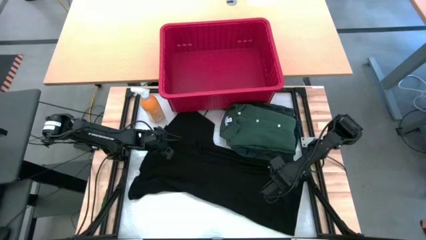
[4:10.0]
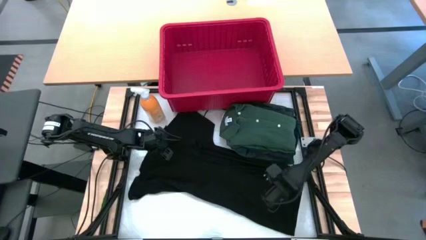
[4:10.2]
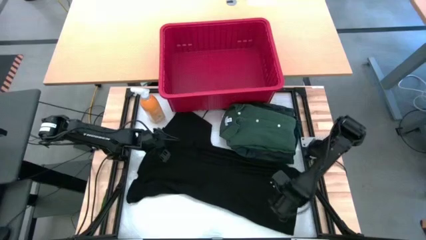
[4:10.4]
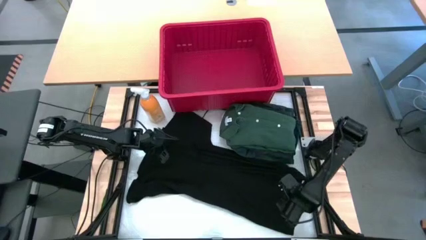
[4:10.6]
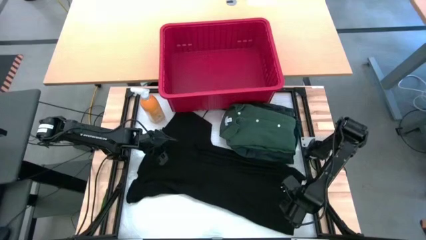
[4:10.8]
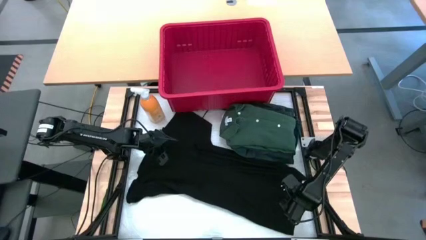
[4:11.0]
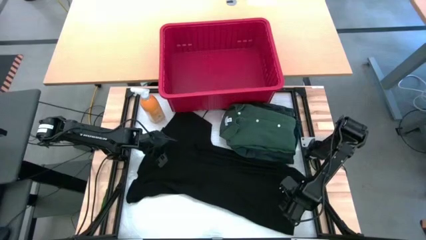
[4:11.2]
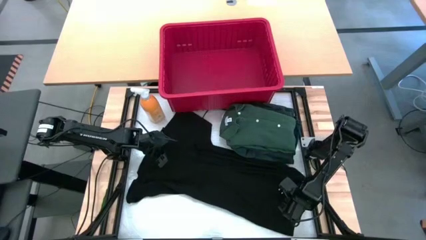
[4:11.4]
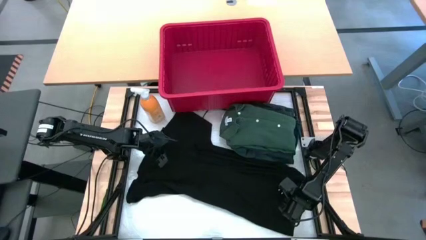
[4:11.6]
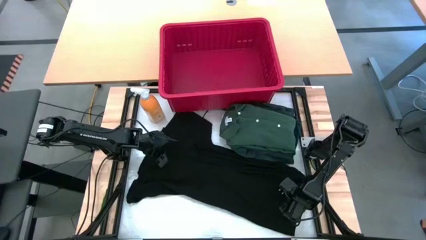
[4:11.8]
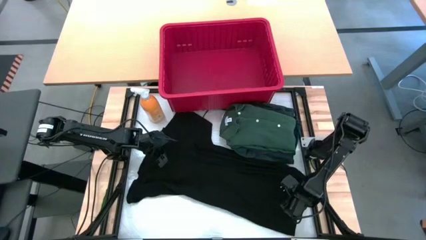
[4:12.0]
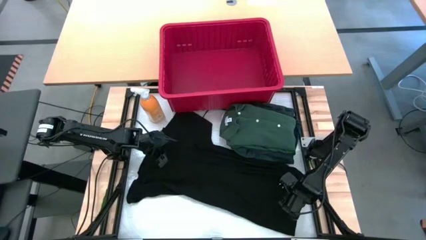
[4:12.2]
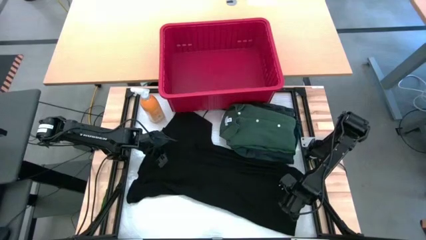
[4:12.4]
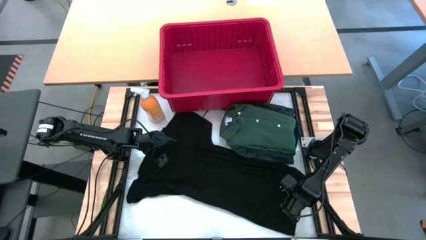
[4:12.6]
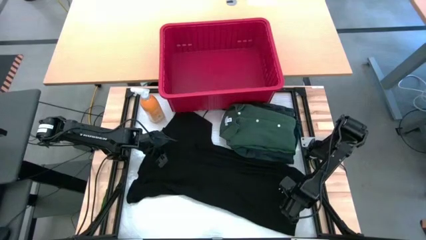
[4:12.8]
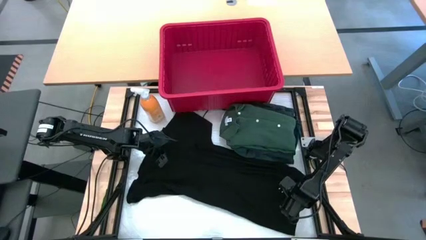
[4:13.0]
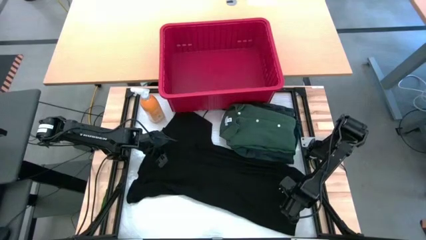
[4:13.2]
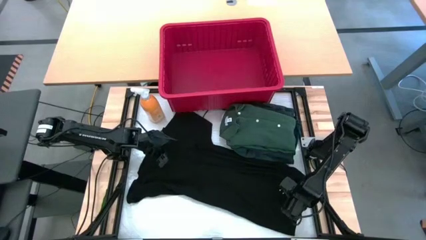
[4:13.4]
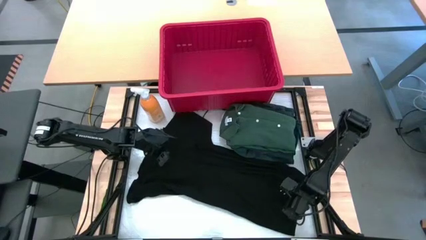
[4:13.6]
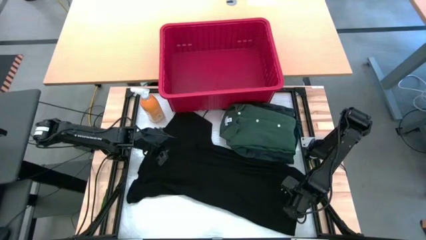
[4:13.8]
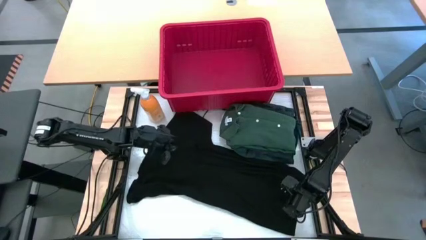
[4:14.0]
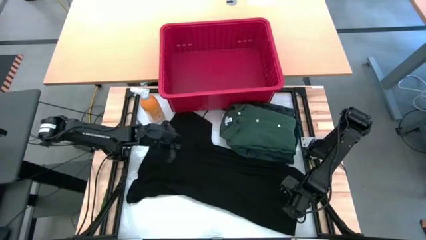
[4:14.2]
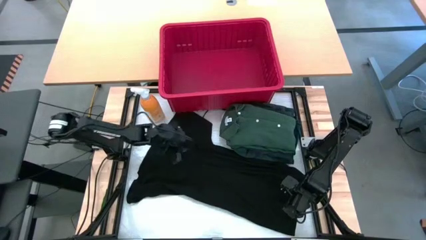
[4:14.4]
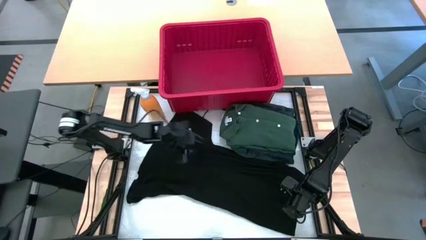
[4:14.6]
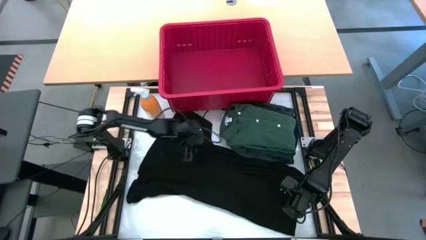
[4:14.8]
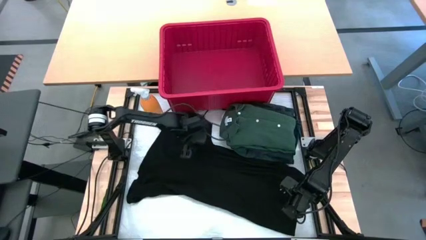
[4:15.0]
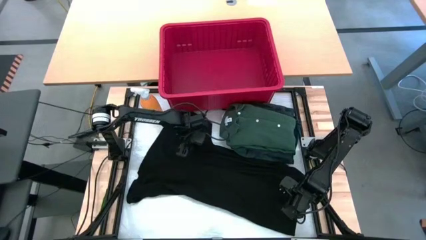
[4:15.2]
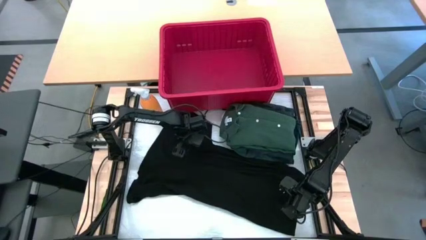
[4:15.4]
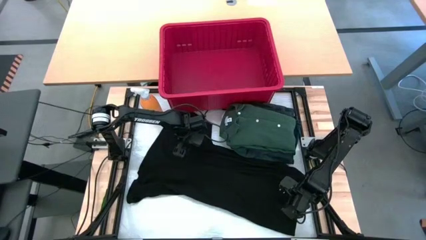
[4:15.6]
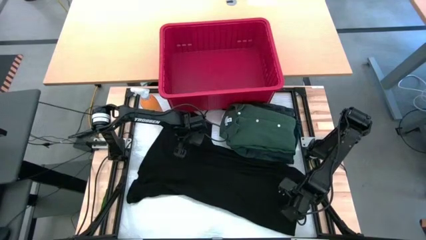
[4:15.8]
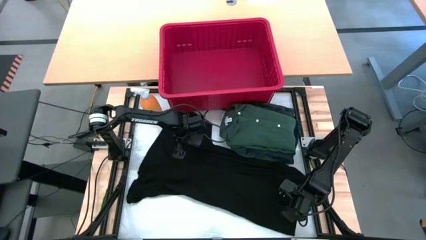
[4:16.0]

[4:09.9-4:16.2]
Task: Fold laundry
Fold the black shirt

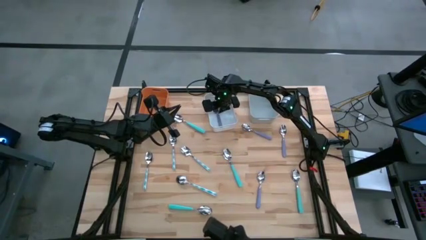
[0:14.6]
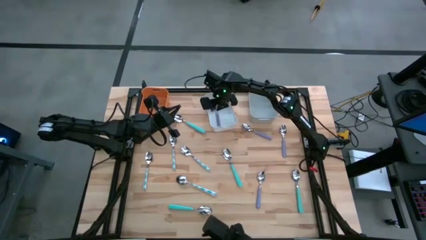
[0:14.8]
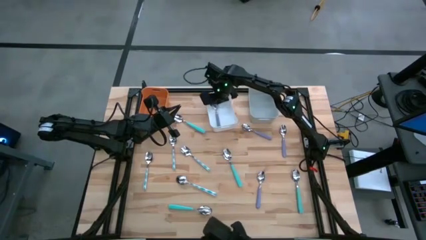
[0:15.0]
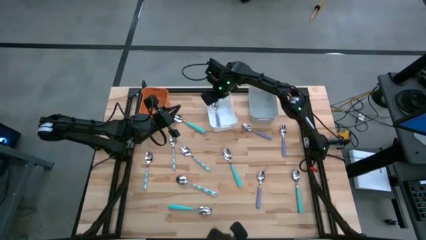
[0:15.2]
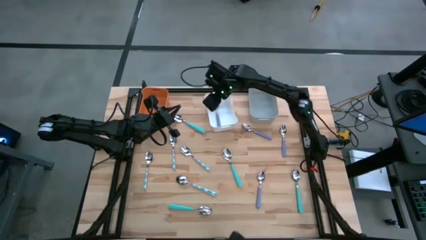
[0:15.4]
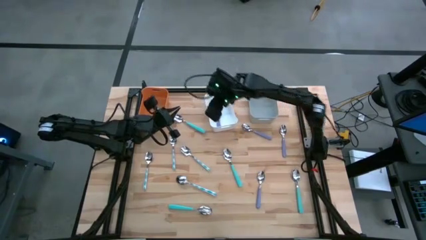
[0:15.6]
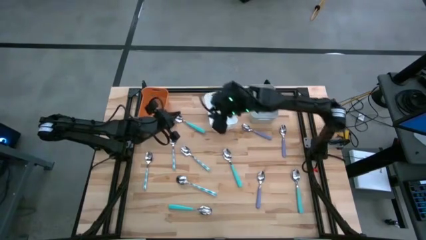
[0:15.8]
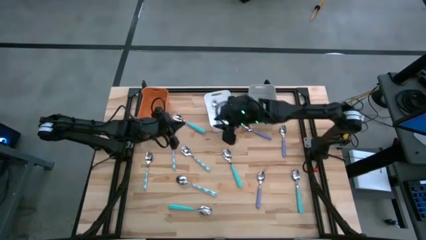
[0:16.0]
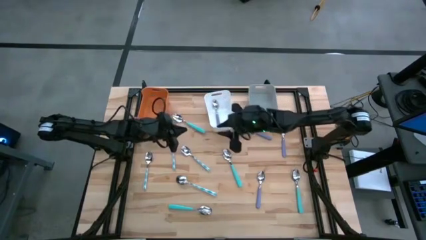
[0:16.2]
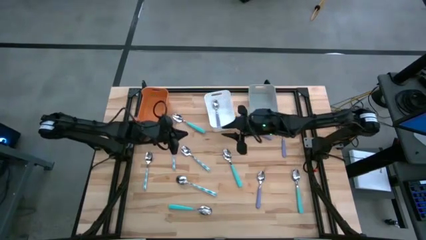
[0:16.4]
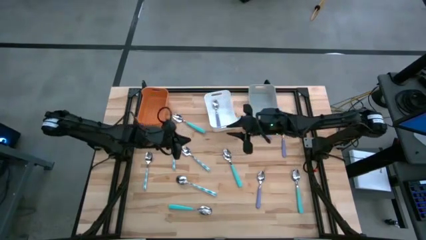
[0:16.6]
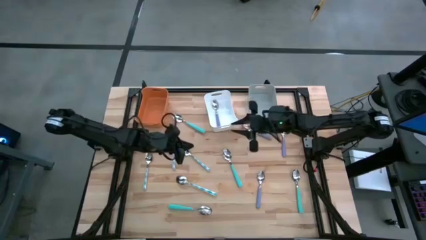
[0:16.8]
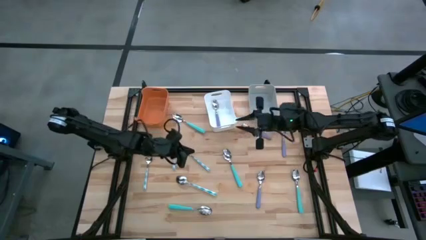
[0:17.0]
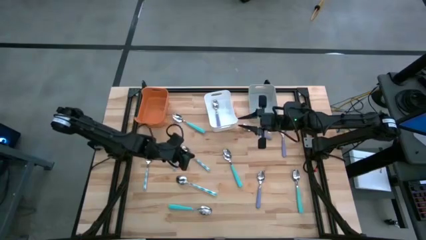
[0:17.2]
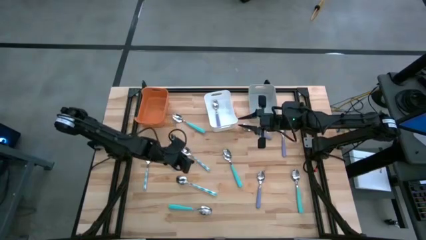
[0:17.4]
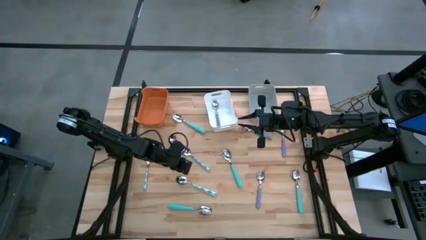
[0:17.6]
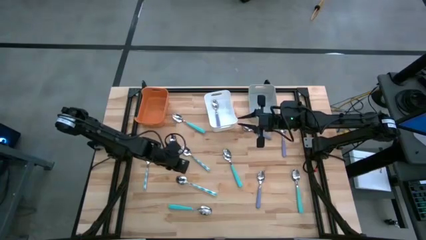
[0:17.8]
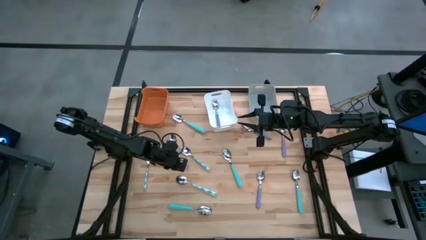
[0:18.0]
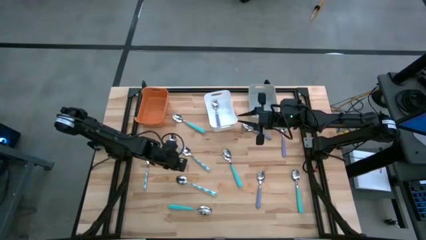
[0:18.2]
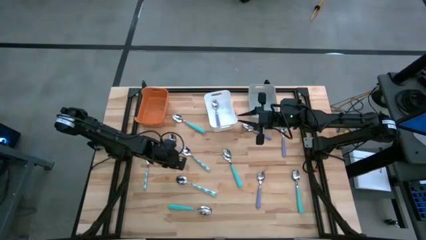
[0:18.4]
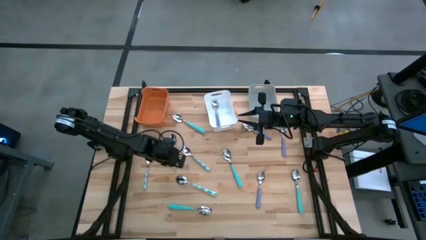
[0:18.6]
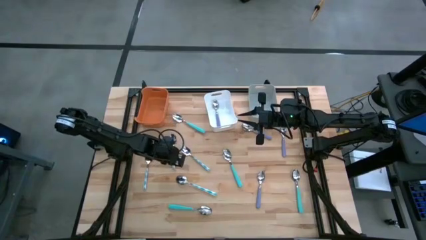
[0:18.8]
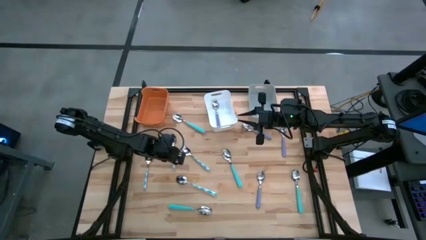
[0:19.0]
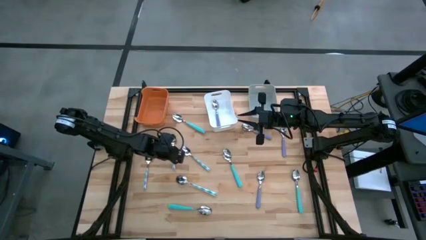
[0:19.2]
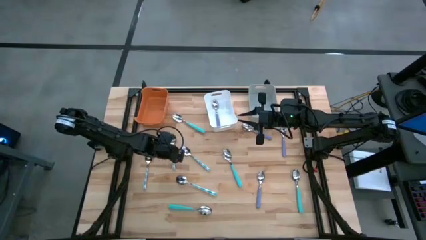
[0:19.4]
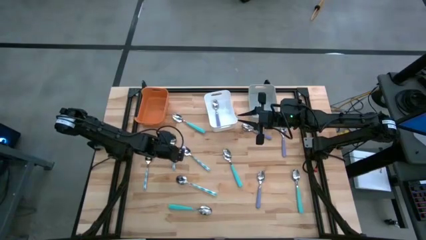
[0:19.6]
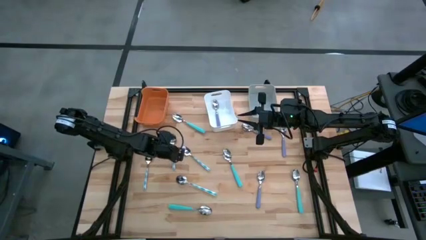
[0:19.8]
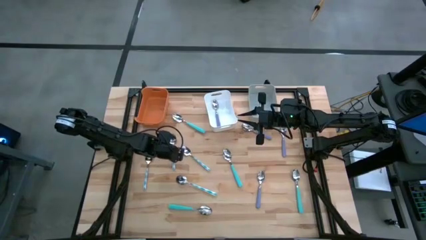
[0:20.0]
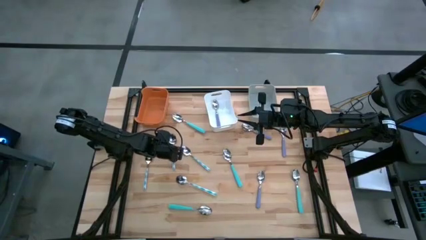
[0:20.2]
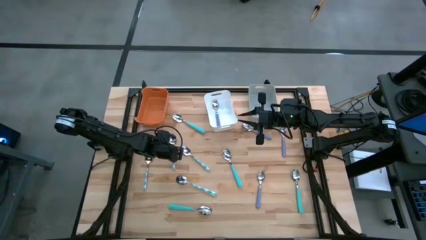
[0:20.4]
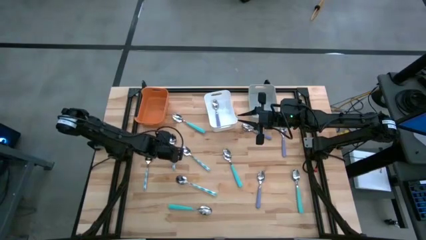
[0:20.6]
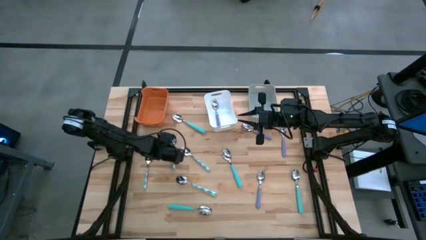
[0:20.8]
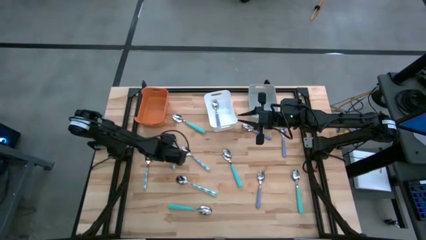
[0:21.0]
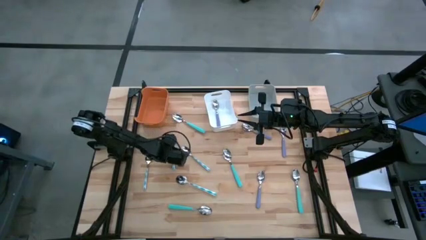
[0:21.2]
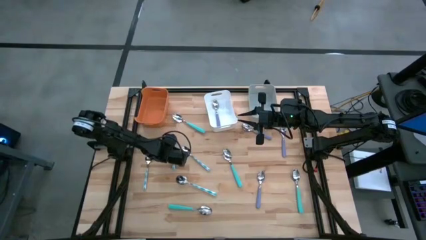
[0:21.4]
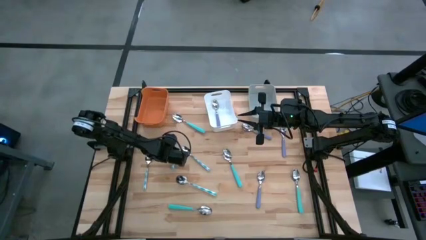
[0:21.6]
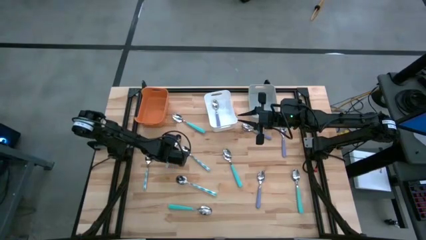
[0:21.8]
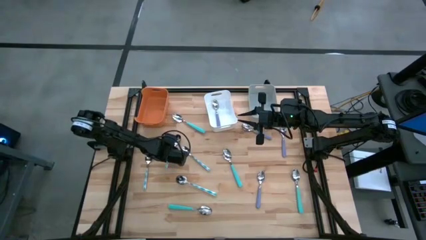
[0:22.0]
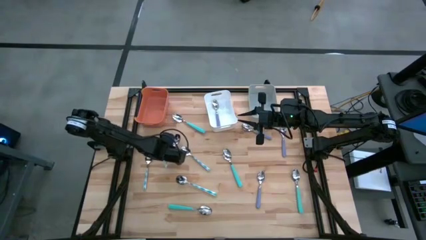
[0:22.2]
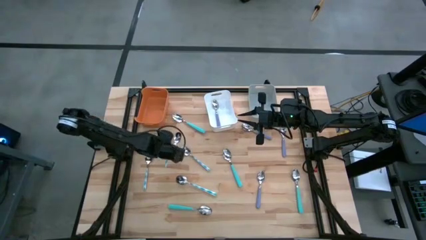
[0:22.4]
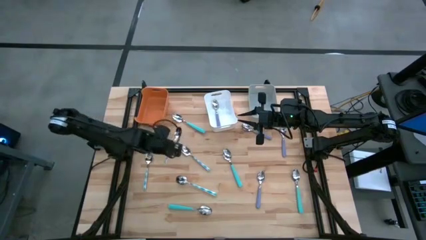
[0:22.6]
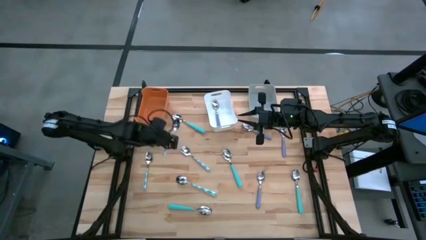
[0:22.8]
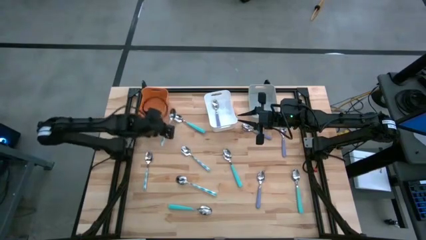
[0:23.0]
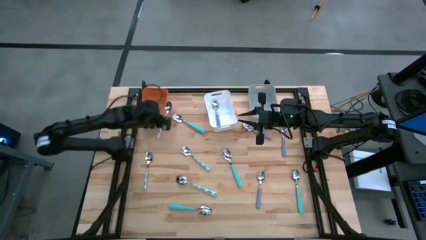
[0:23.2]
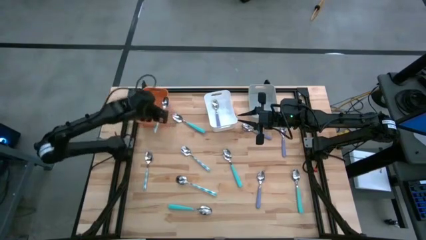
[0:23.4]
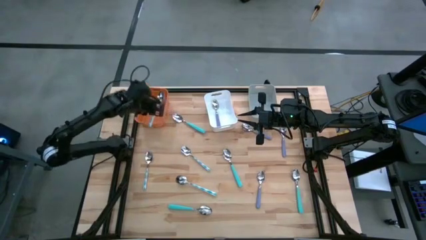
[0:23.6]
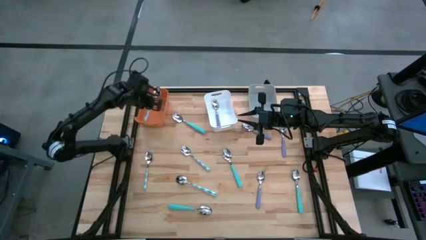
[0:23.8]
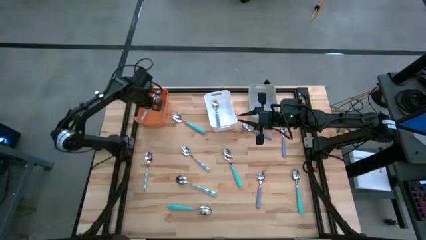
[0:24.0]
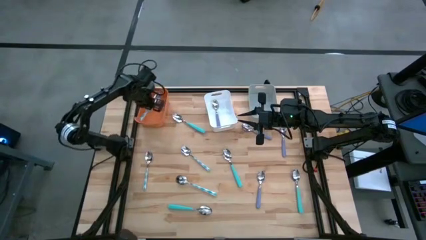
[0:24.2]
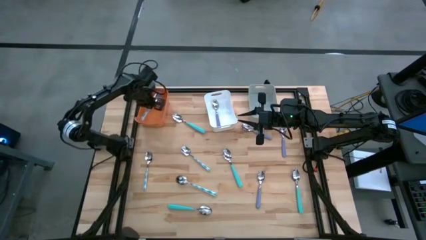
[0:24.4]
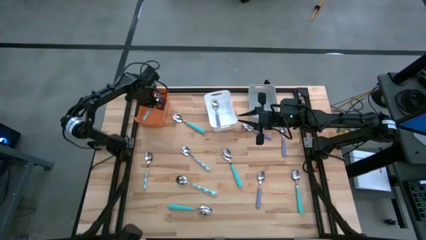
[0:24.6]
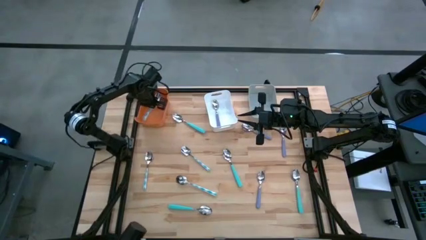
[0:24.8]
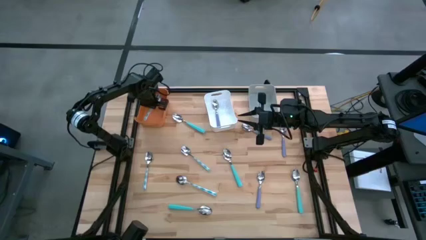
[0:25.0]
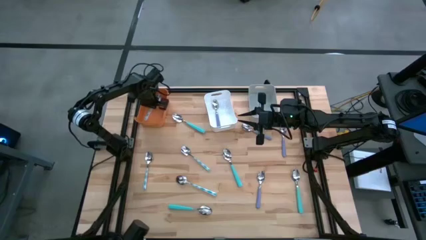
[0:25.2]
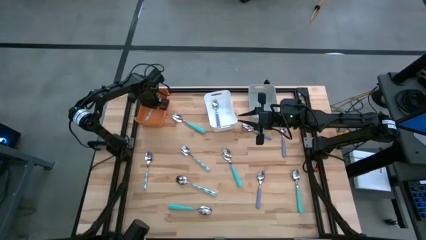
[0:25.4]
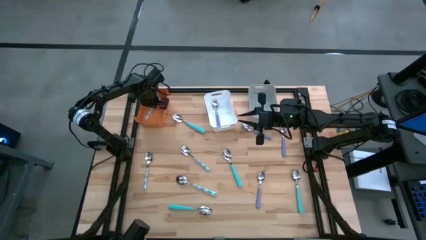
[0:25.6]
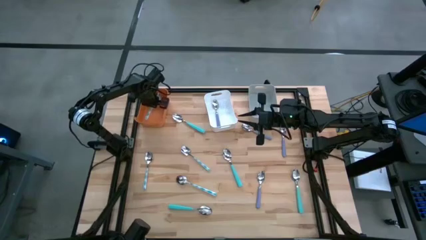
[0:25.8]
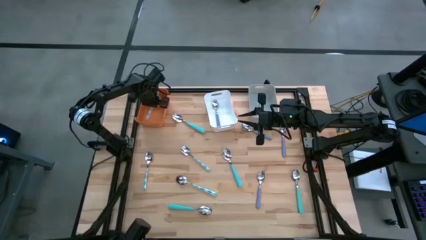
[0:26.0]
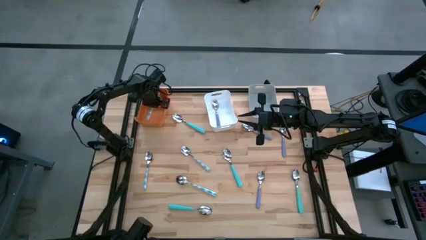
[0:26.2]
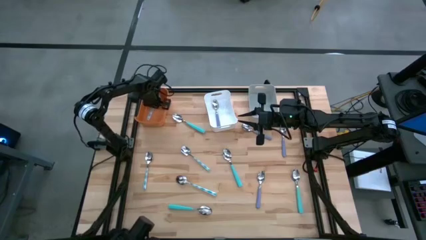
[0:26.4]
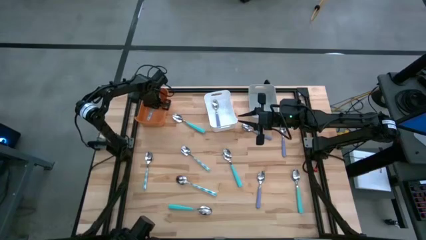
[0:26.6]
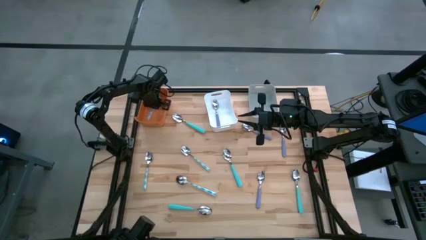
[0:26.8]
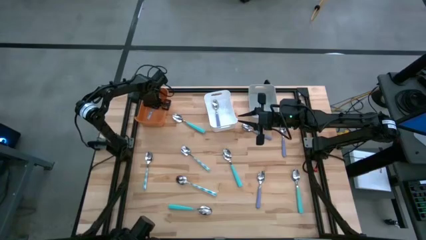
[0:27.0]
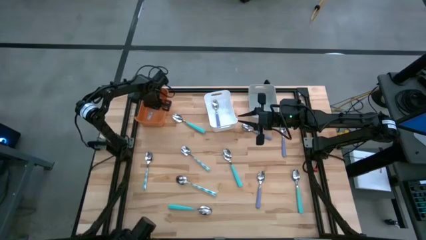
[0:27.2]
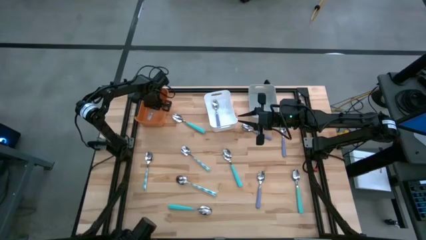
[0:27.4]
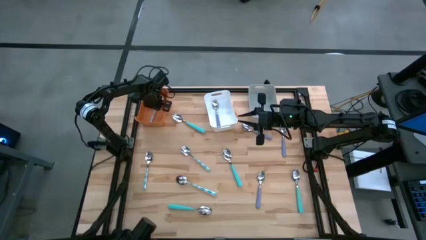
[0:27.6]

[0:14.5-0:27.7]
Task: Sort silverware by color (type)
Put the blue patterned spoon into the orange bin
